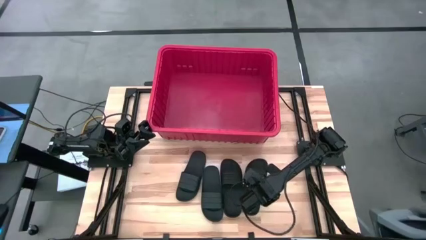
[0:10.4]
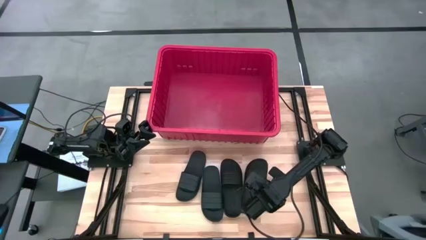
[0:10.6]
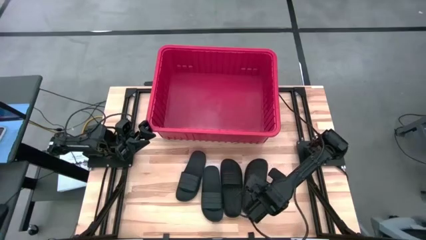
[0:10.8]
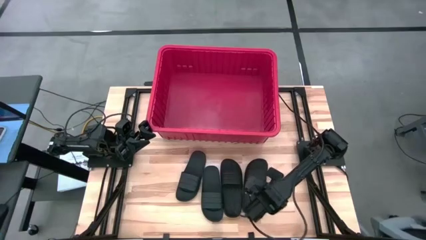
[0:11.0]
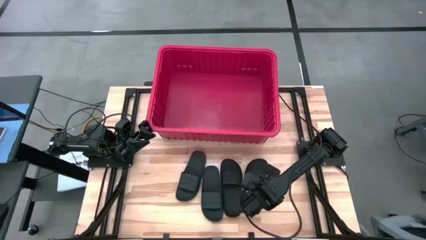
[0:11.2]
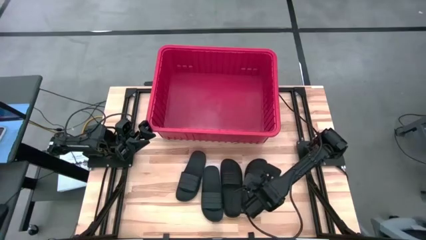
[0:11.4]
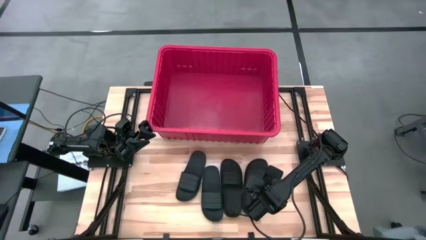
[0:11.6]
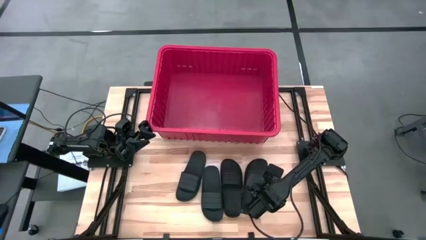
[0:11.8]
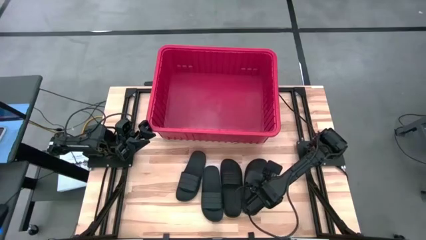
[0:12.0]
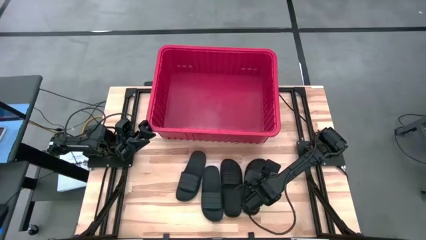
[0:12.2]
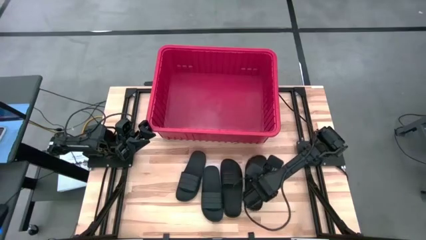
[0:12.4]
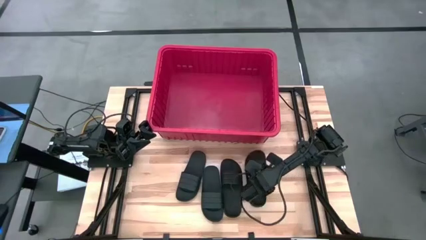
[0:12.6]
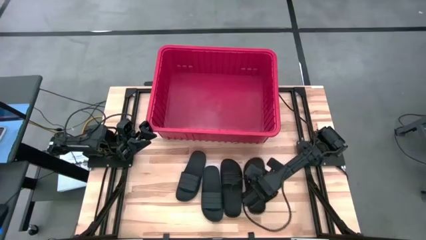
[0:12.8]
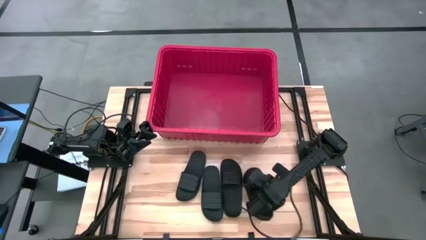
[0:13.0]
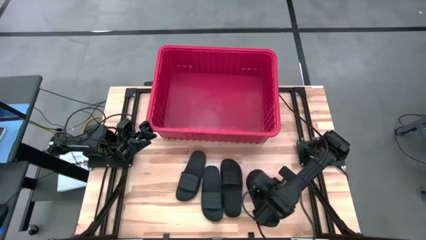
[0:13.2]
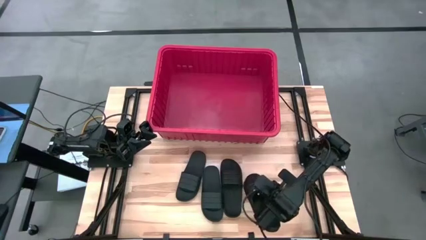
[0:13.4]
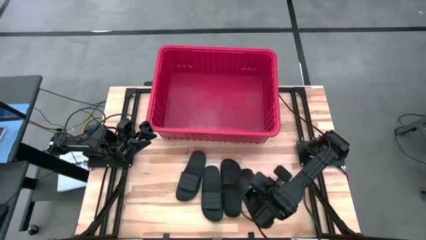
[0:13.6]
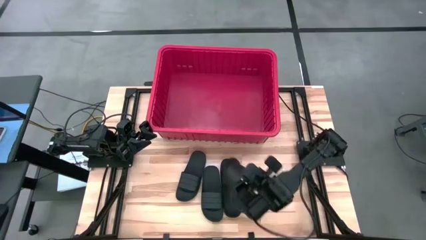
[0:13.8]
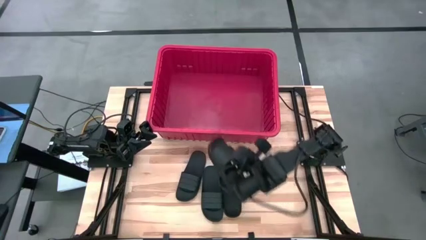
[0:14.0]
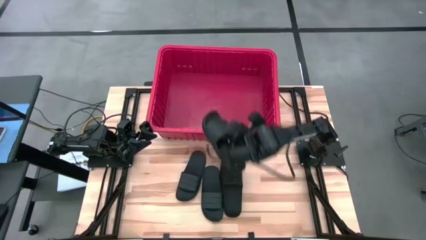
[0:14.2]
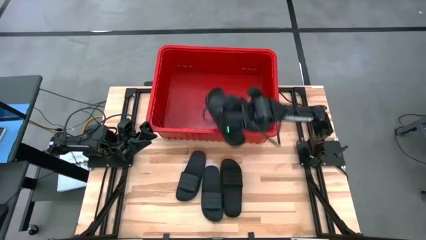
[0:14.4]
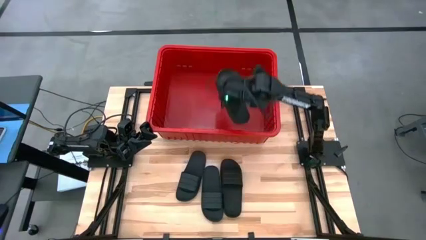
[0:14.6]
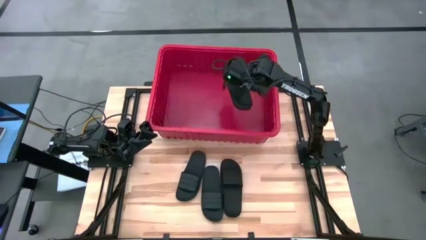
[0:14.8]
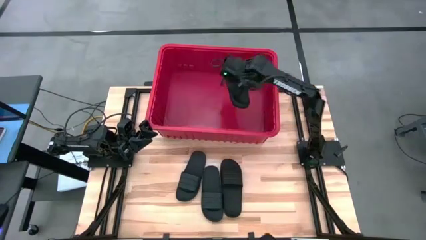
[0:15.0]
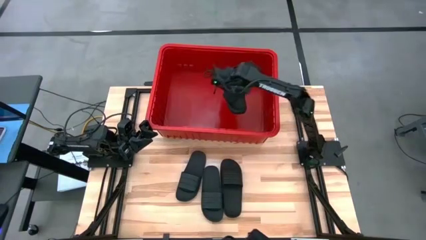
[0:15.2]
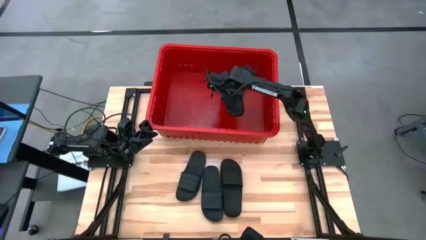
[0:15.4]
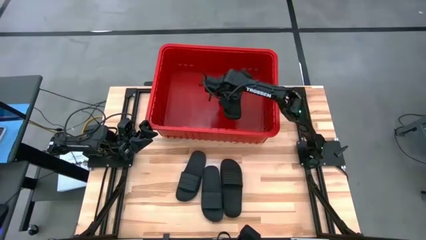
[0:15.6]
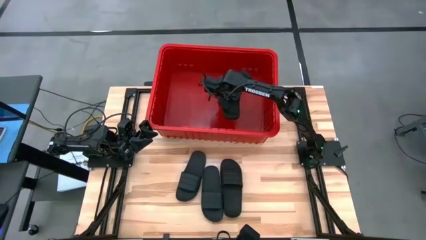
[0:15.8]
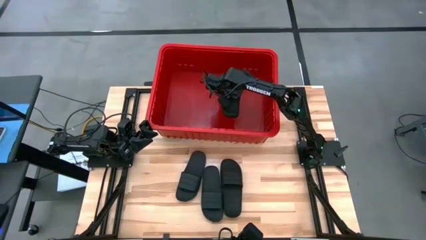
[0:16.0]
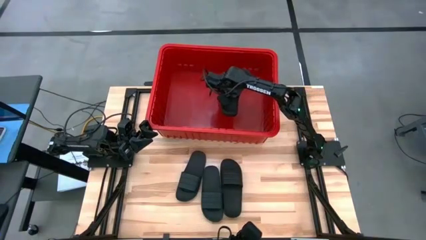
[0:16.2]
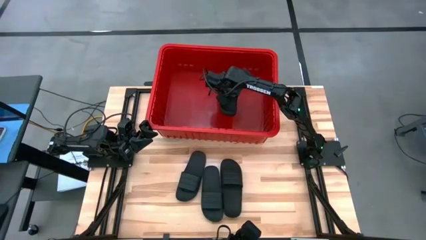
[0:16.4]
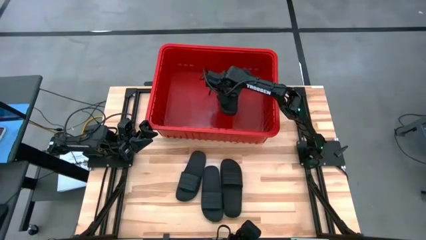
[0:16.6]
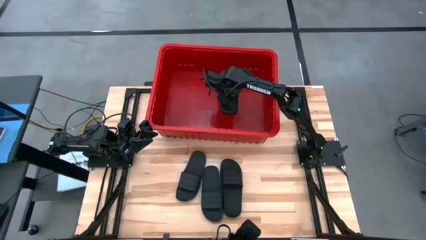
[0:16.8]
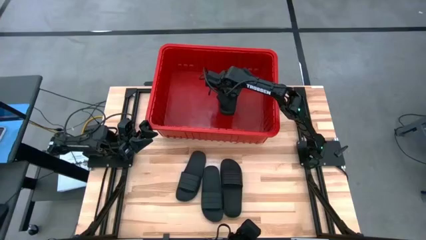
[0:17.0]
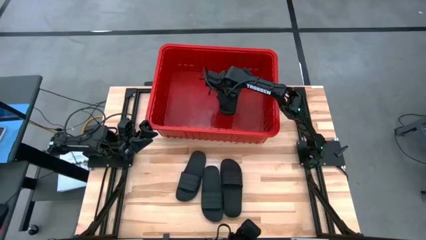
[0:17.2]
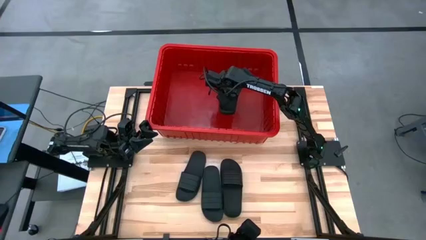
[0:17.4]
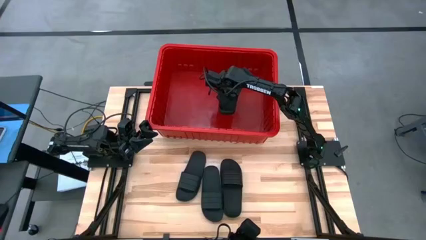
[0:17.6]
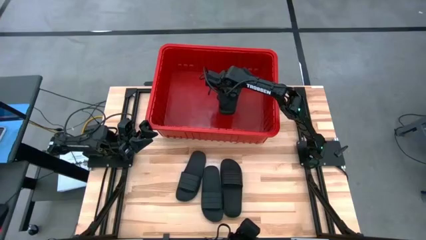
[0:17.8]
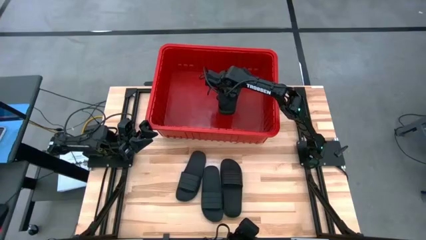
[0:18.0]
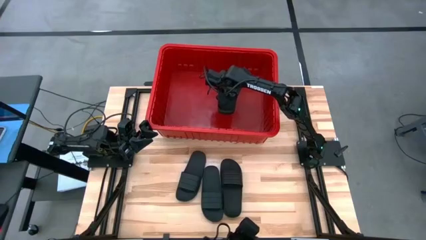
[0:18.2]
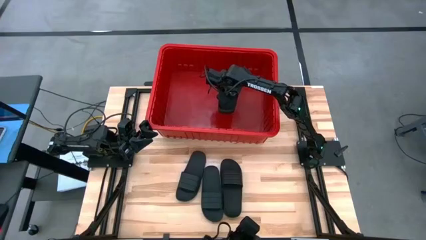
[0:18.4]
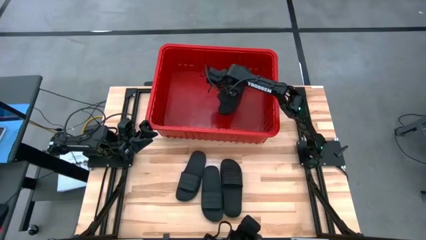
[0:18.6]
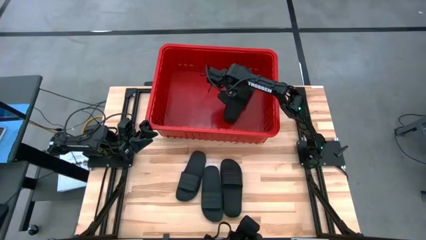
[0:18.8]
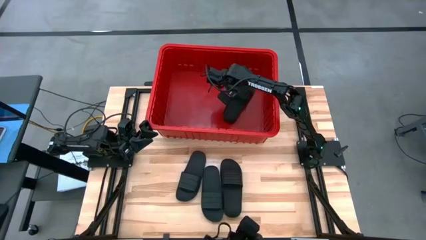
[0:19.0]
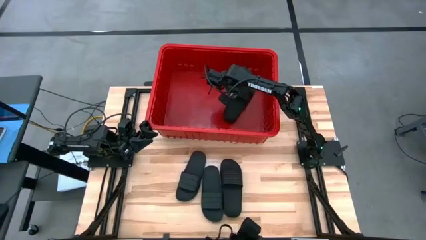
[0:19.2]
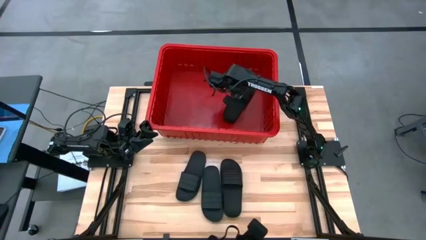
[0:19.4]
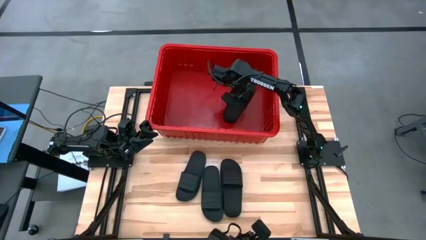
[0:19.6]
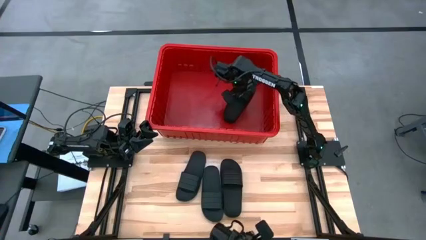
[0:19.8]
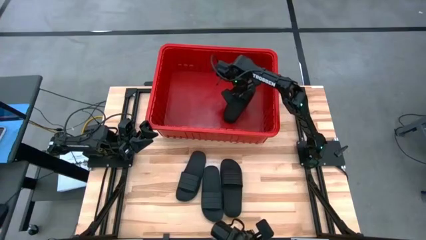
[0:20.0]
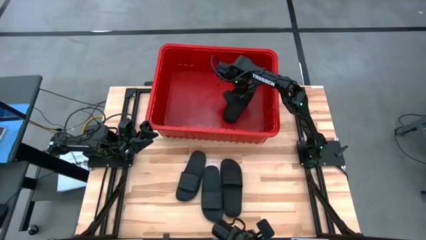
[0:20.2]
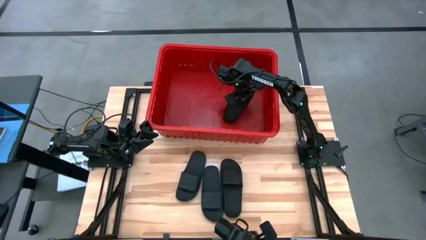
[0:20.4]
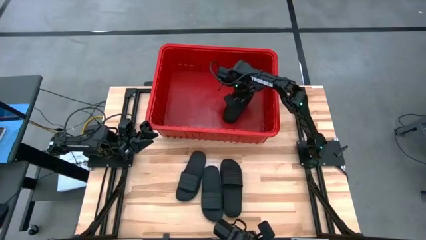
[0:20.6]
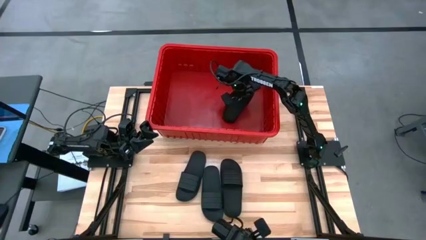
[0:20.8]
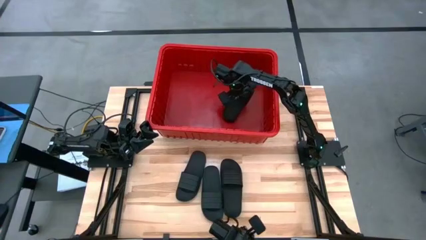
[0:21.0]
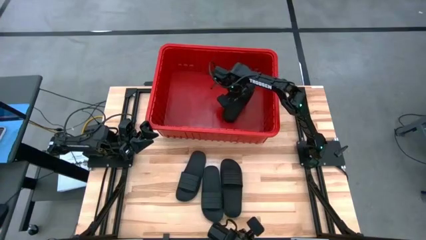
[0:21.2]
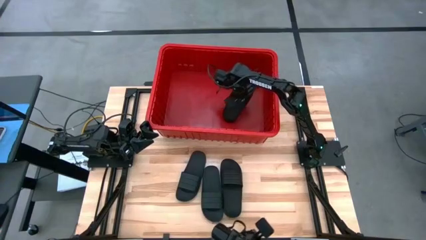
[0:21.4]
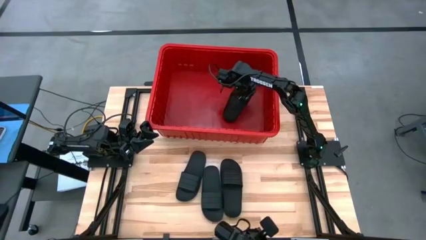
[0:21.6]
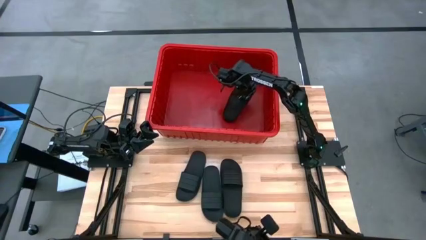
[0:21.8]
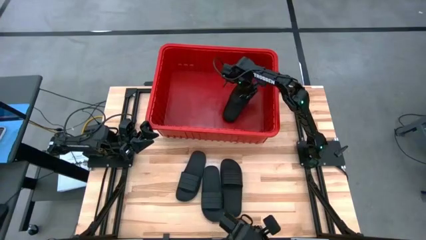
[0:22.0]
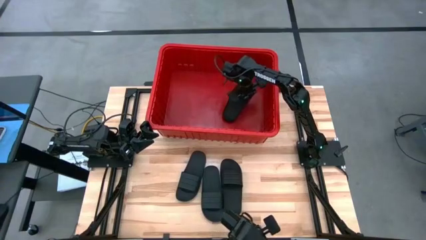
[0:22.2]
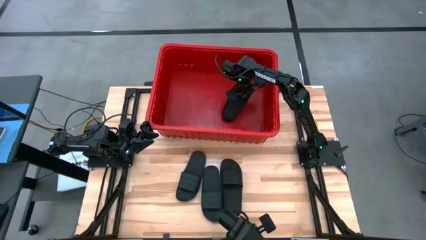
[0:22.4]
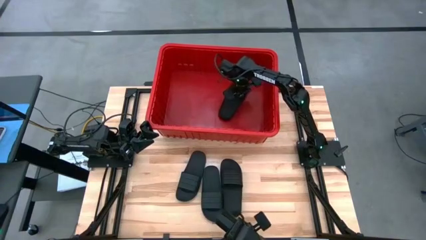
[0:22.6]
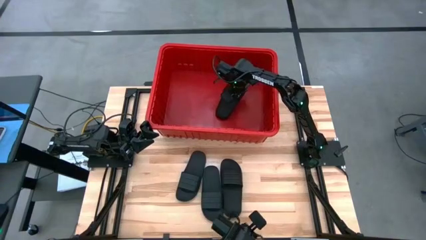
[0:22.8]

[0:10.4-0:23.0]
Task: Pick and place slides into bin
Put the black slide into the red bin

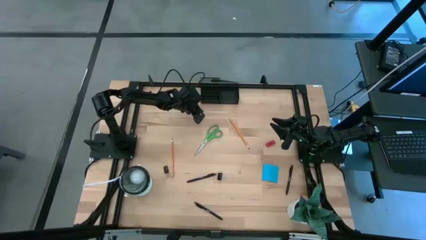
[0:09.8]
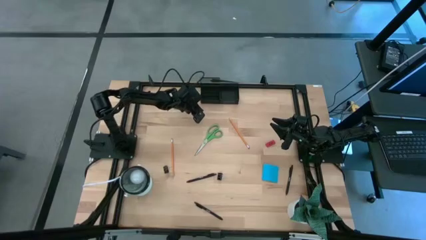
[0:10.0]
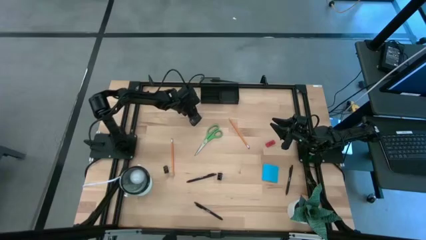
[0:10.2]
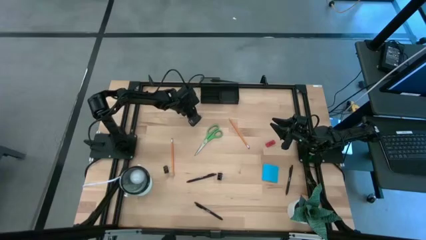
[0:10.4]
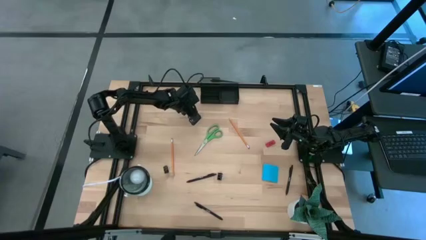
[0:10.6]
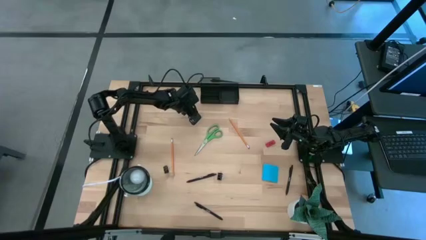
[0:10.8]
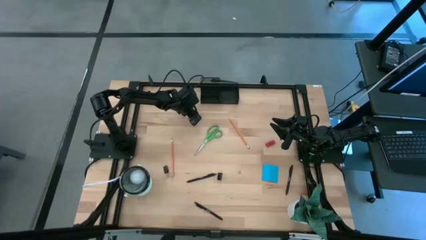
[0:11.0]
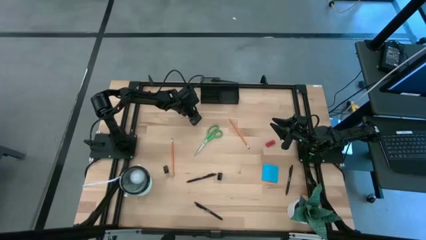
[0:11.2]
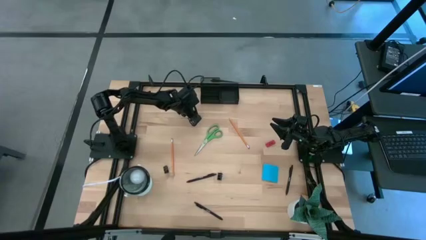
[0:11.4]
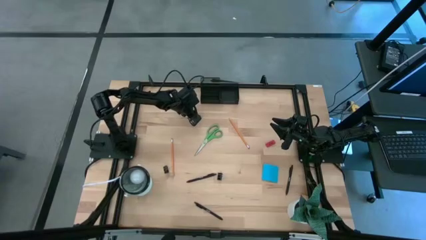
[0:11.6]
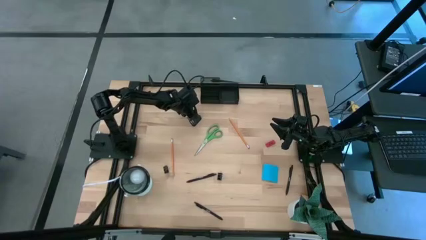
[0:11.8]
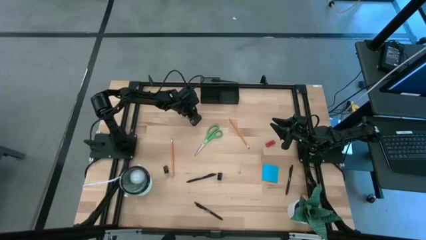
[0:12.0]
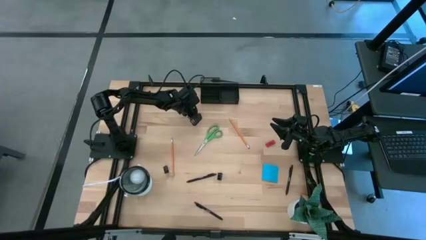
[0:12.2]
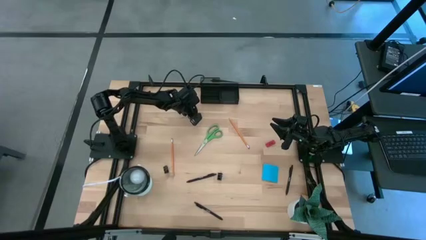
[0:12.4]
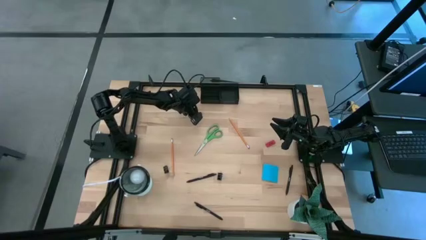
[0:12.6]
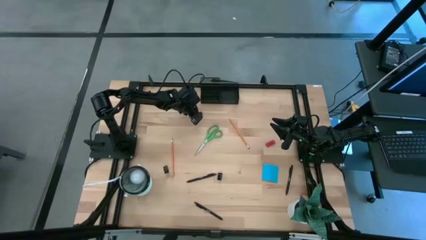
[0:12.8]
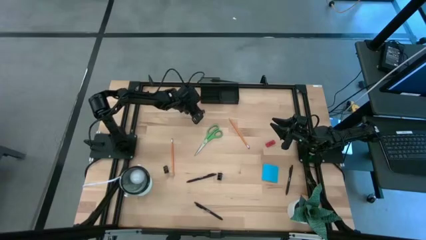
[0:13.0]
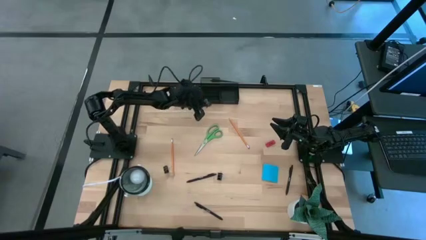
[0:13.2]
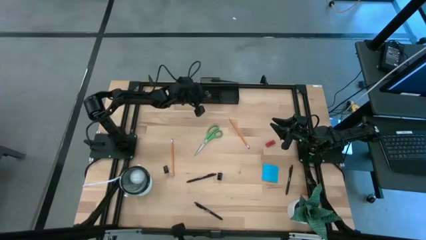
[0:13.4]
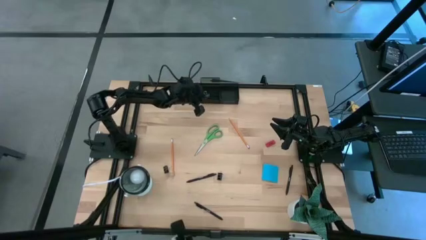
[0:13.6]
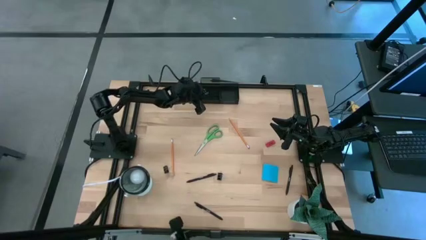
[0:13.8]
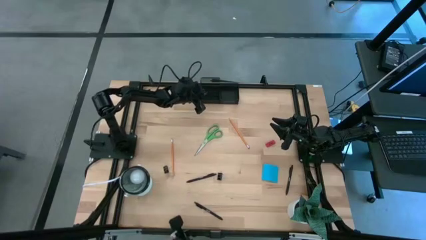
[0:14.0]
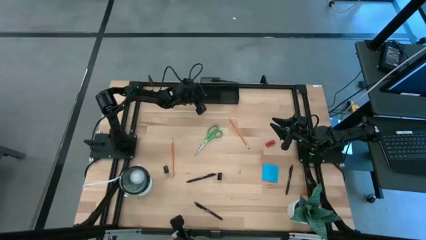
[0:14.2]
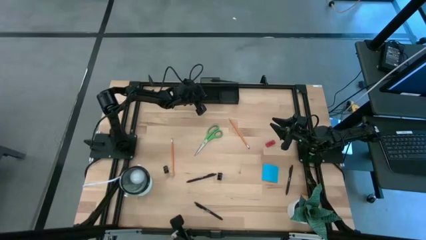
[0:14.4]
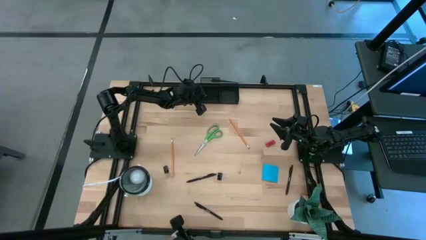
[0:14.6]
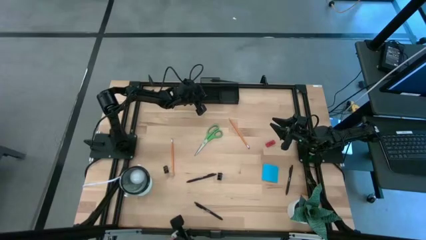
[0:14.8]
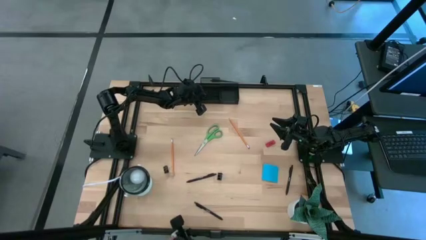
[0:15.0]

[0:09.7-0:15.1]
Task: Pick and place office supplies into organizer
Put the top black binder clip into the desk organizer
